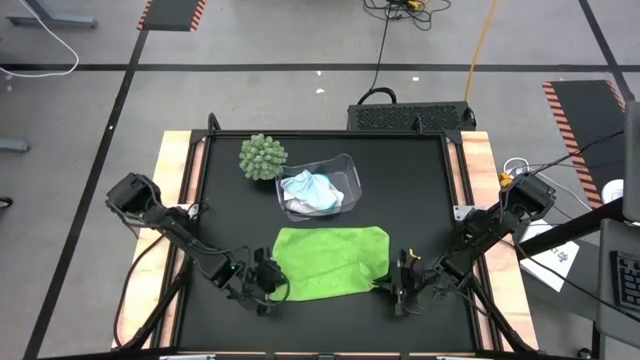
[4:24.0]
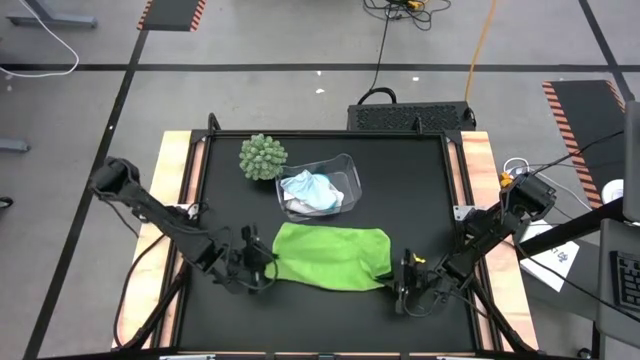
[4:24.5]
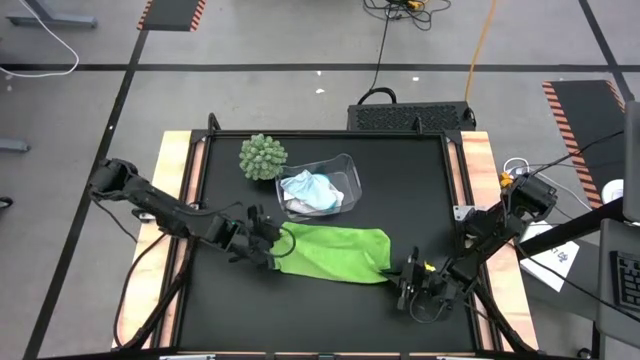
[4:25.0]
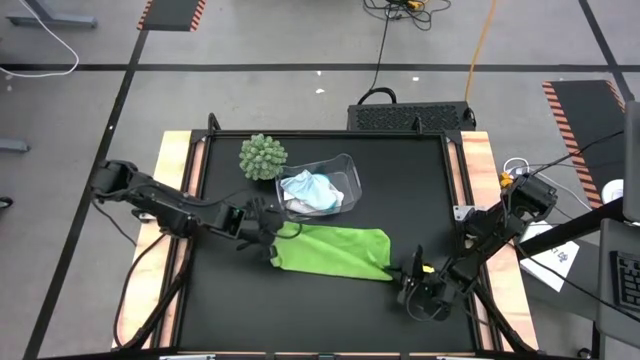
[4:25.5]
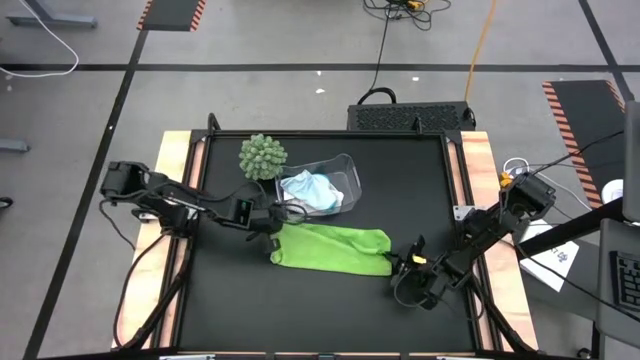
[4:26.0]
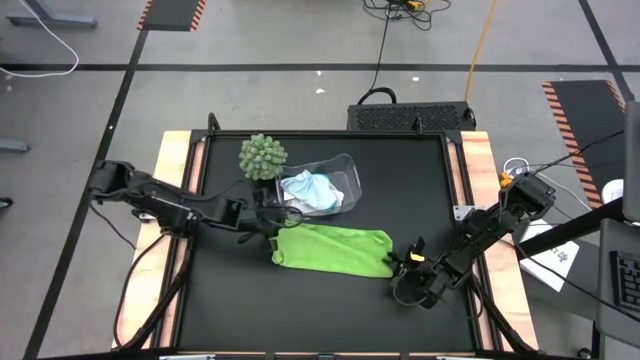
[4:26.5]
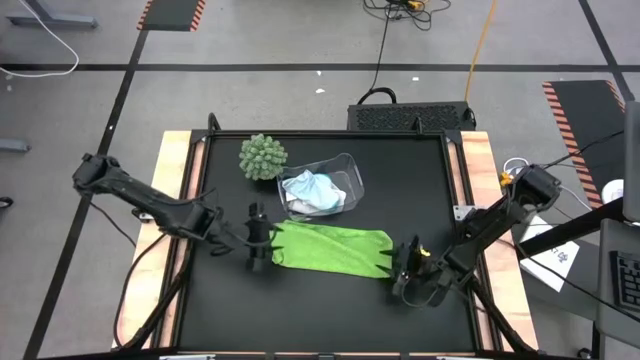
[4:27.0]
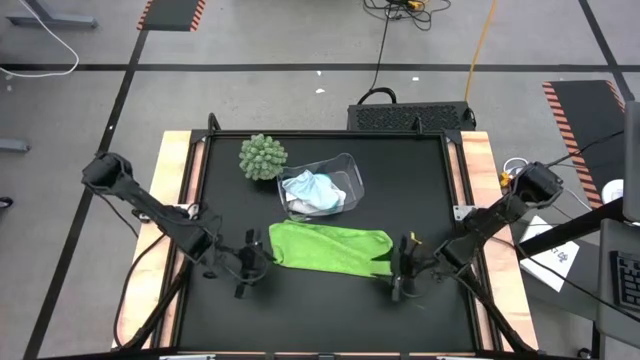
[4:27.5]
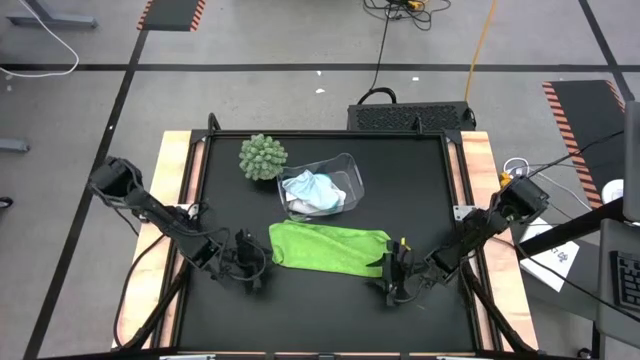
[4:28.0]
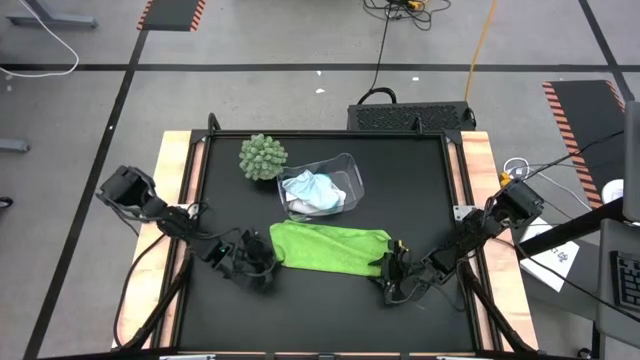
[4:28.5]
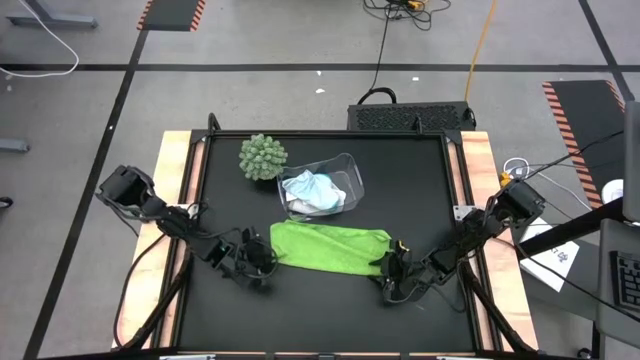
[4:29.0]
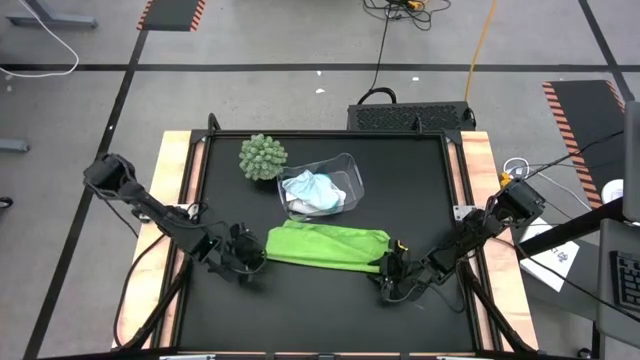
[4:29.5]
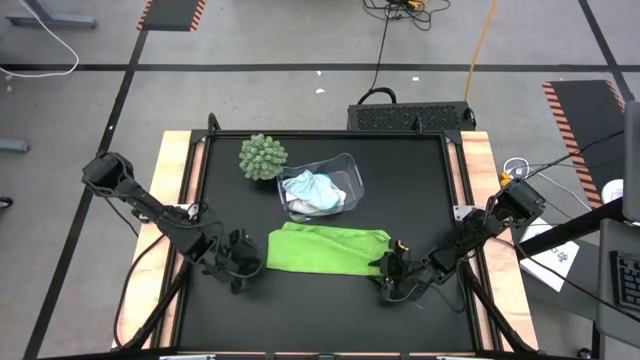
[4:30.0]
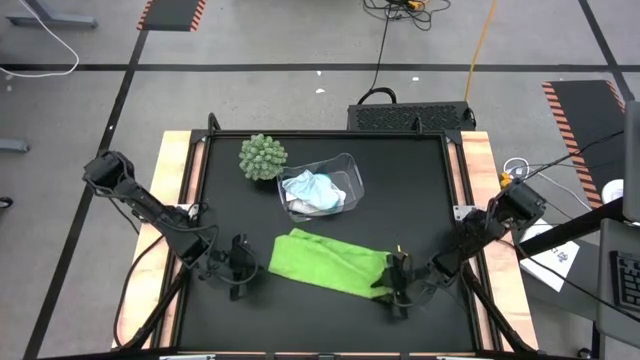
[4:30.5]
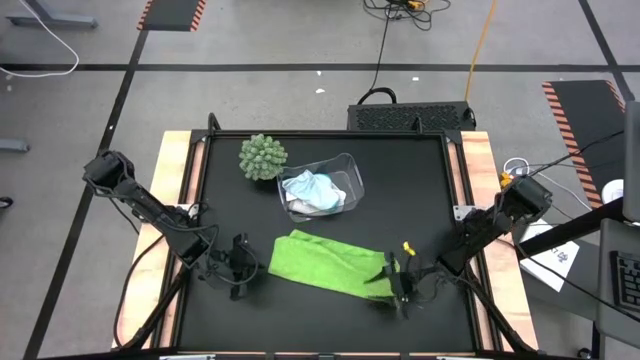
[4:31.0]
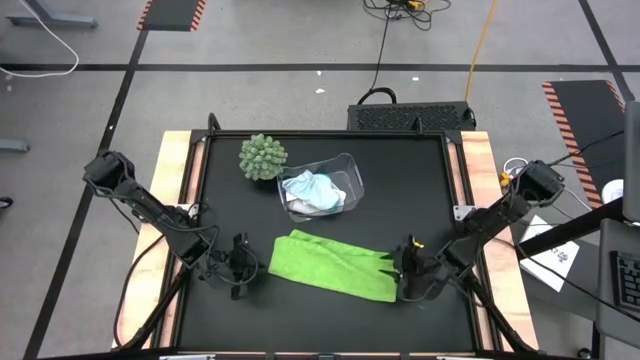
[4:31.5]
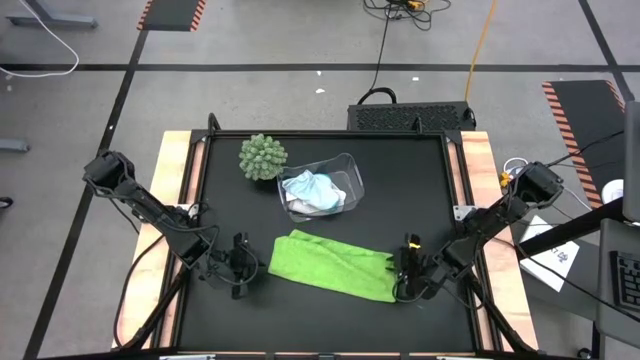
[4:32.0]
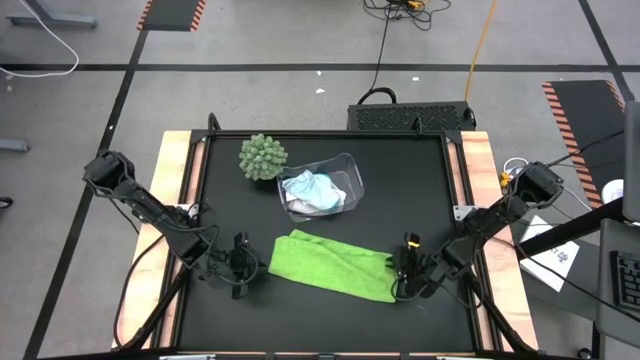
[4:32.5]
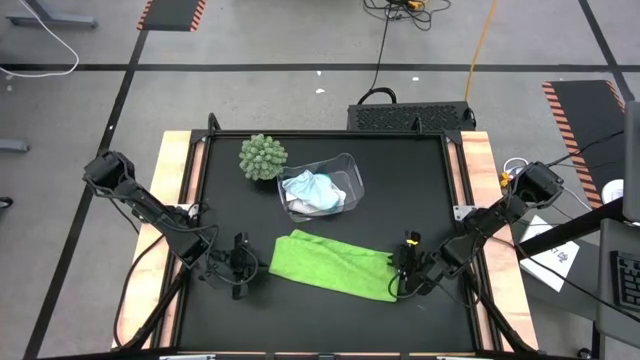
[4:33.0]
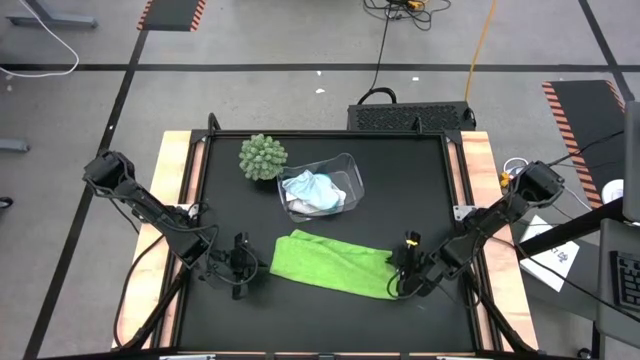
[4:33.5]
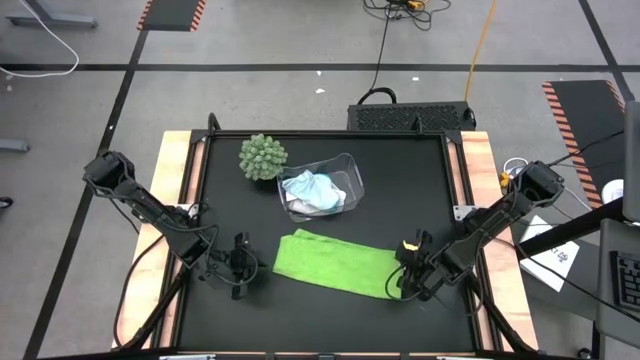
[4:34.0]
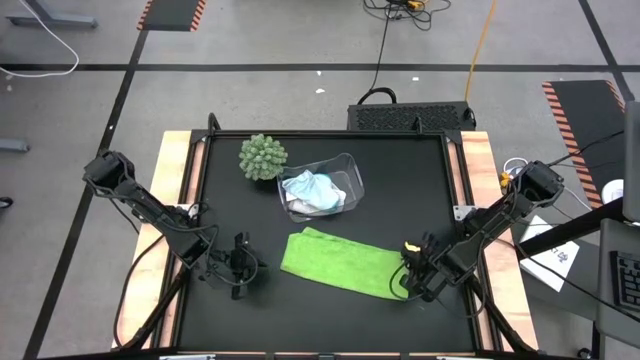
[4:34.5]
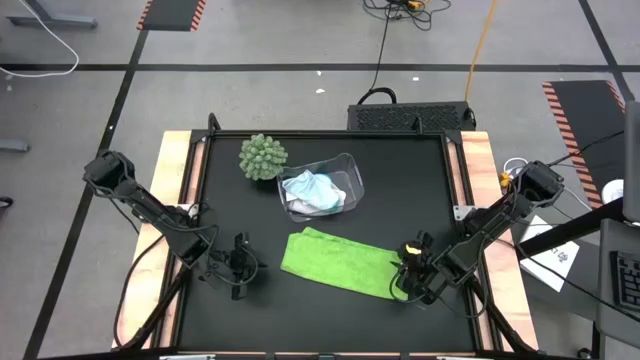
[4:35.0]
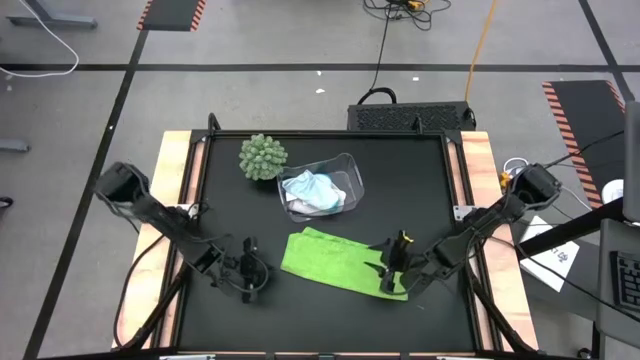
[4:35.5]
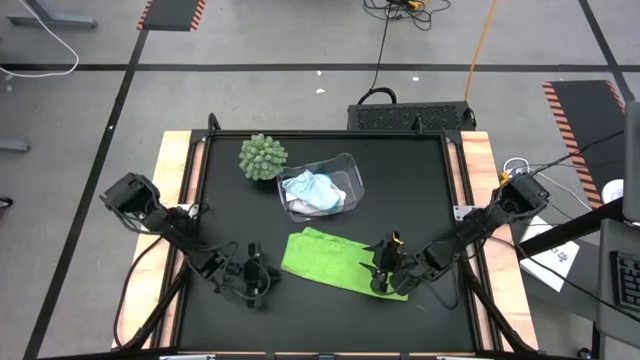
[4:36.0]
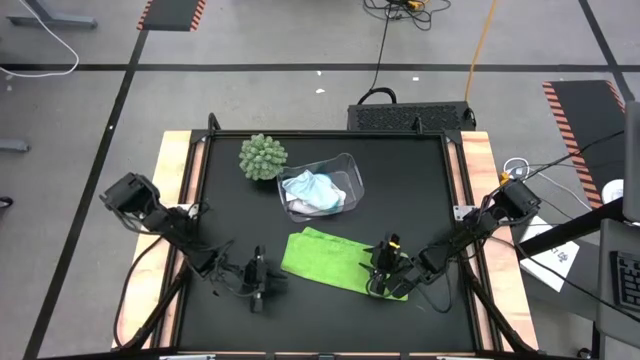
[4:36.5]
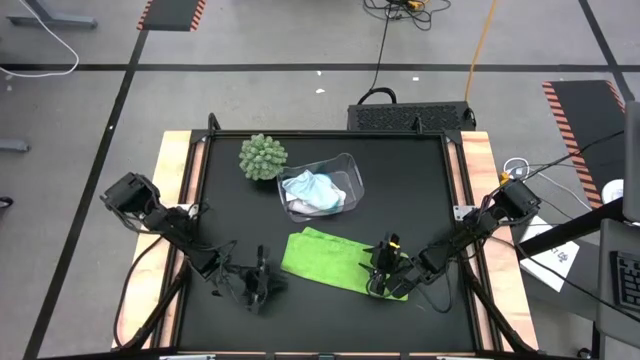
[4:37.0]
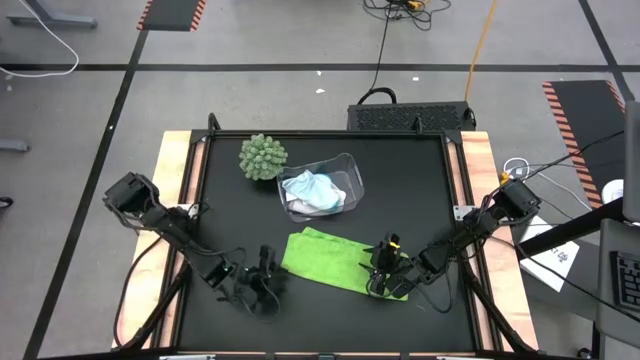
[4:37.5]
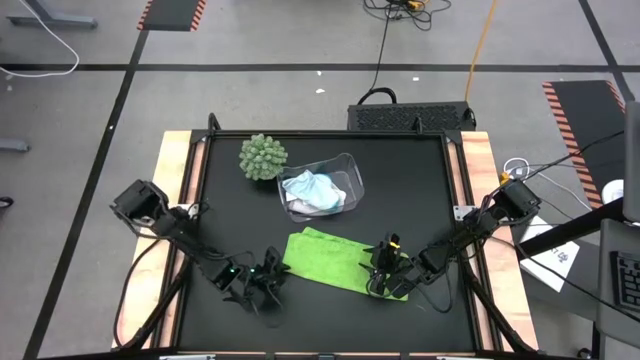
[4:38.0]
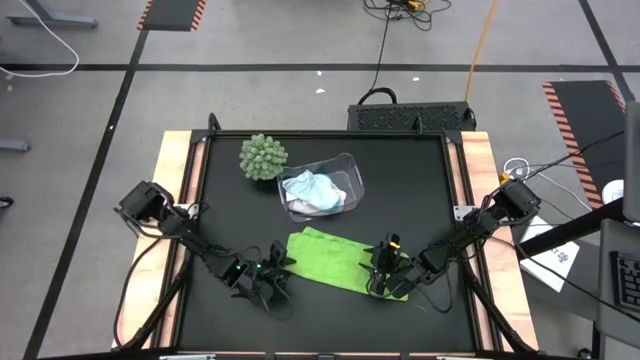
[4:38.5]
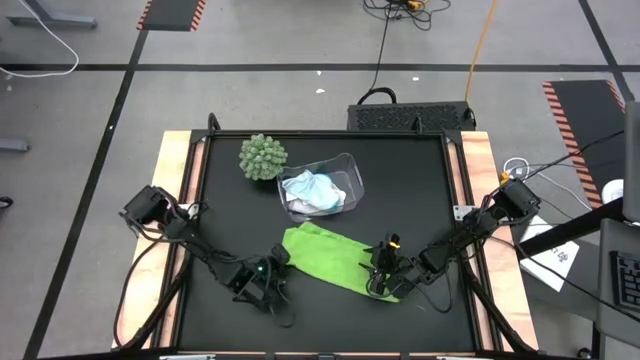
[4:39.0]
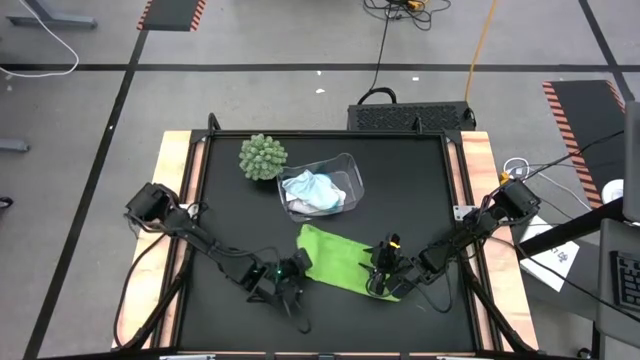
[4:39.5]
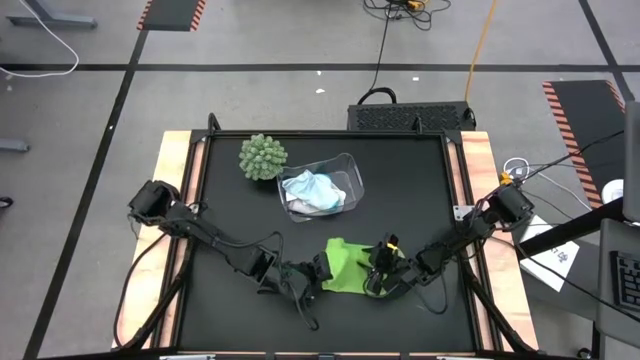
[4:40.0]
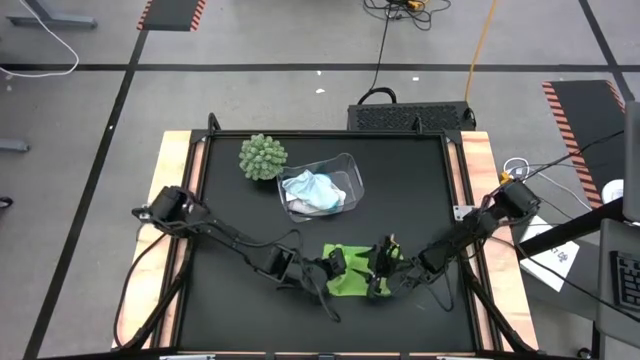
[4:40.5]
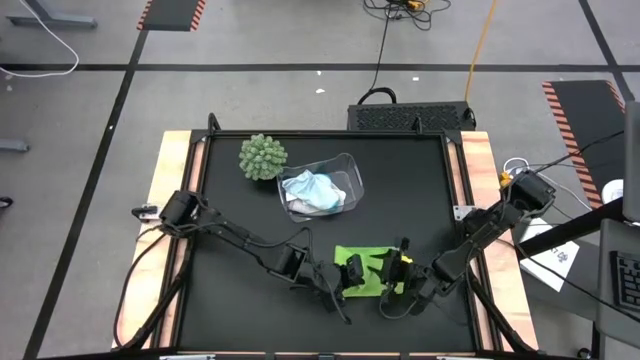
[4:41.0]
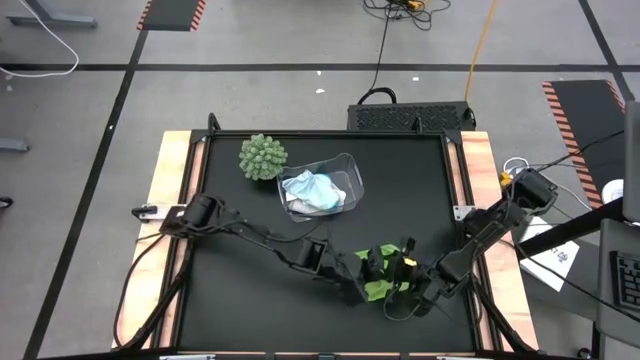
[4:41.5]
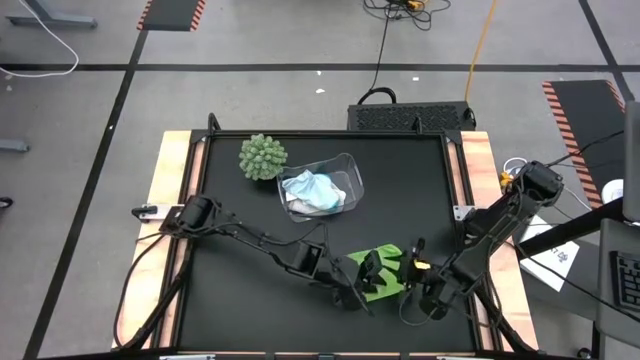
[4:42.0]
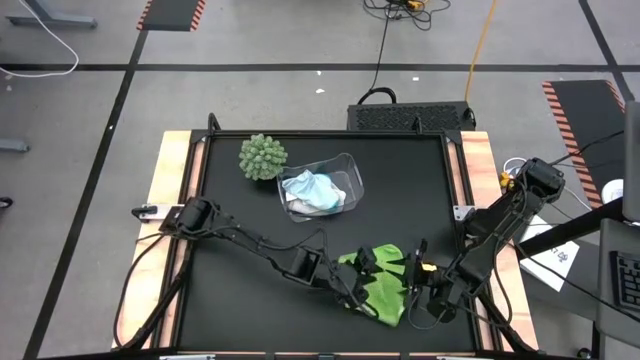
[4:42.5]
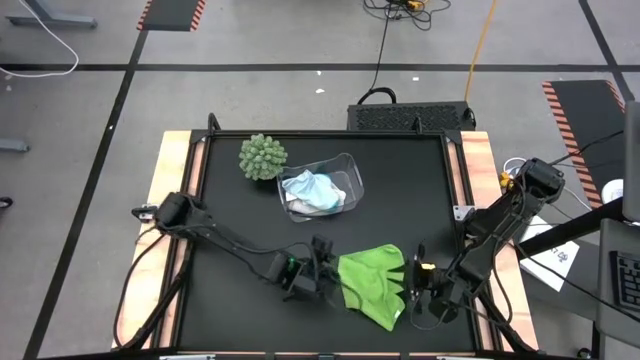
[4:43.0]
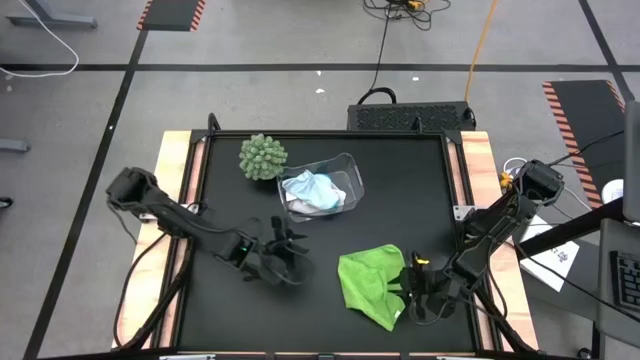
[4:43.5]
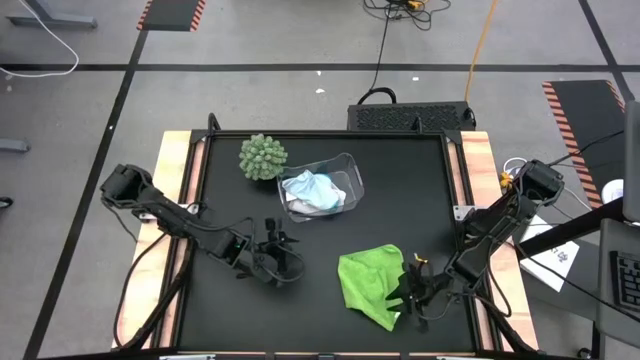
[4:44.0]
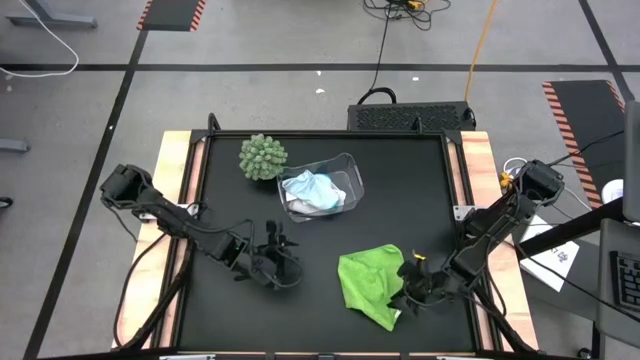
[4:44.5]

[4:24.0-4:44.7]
Task: Fold microfiber towels
Fold the green towel

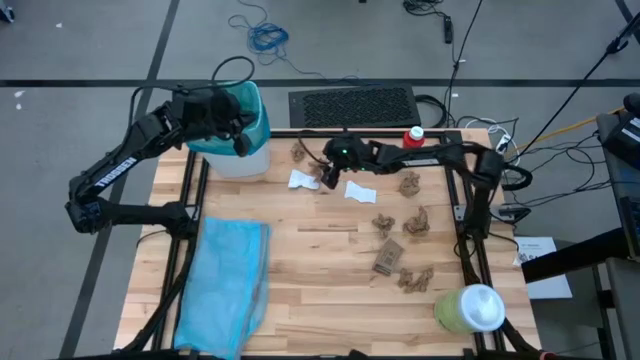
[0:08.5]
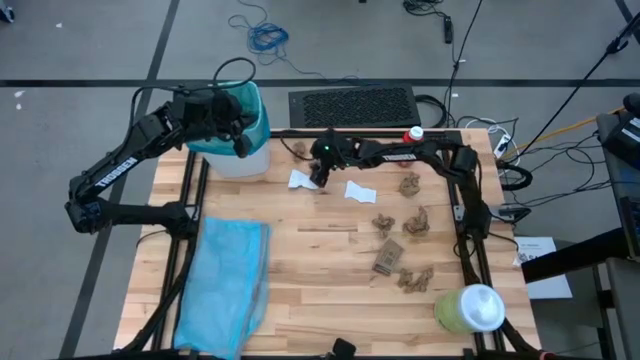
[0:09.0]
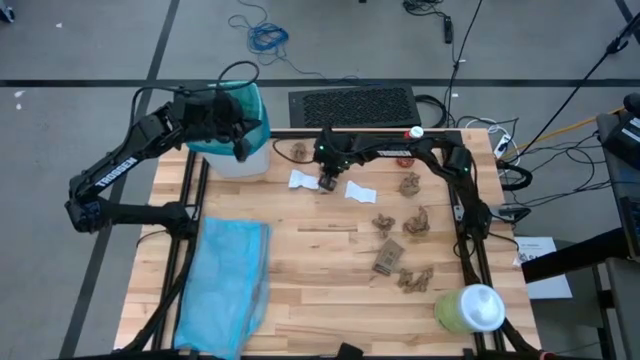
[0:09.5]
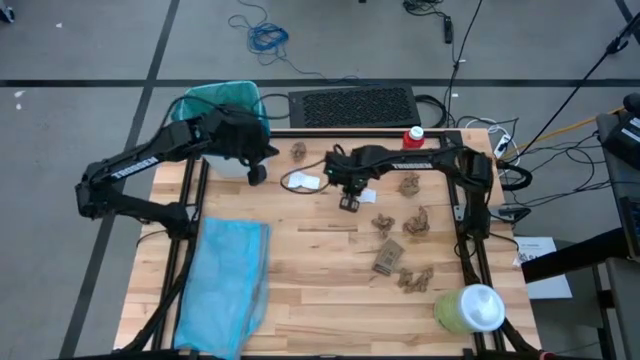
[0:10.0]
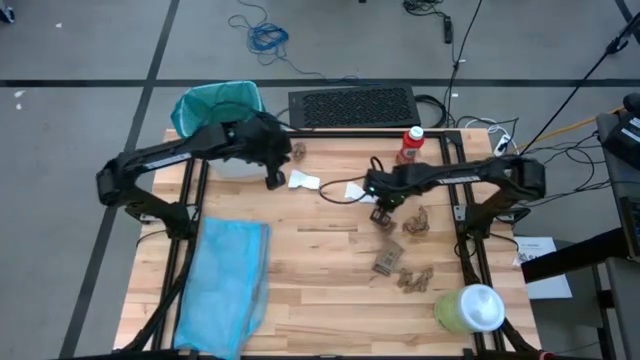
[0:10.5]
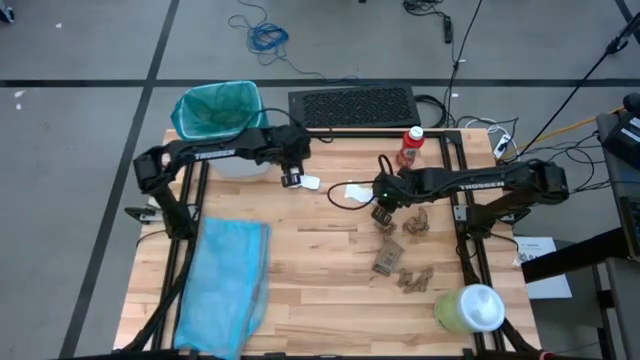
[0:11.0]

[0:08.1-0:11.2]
Task: place trash/remove bag and relplace
Put the brown napkin into the trash bin
